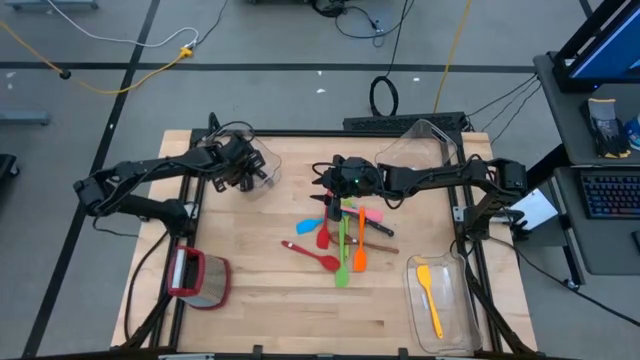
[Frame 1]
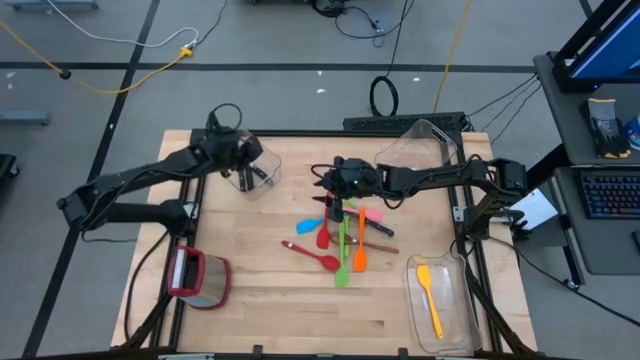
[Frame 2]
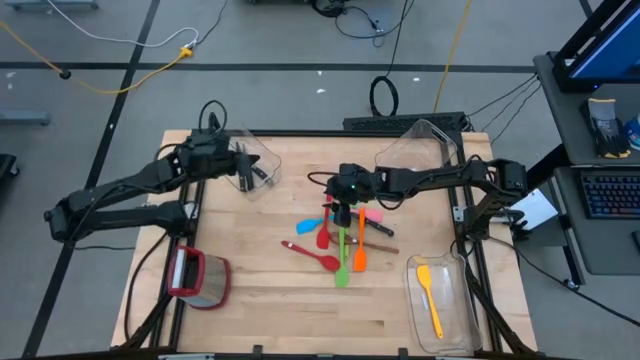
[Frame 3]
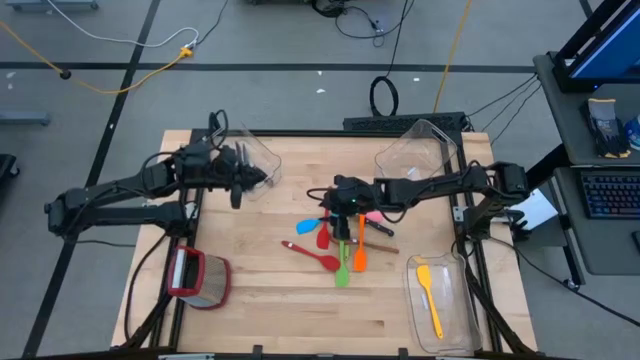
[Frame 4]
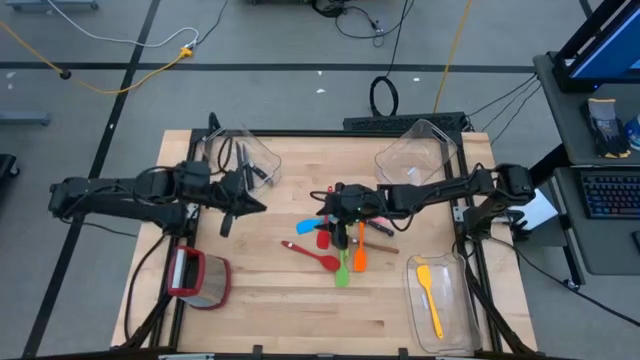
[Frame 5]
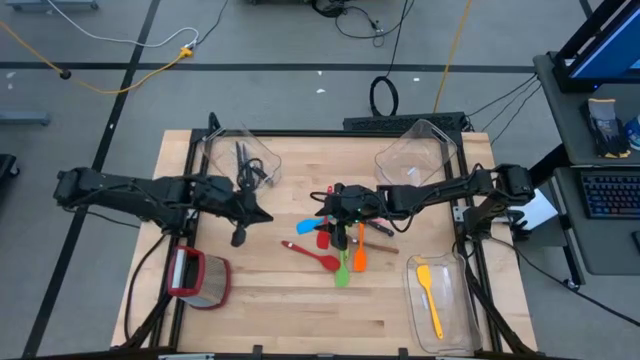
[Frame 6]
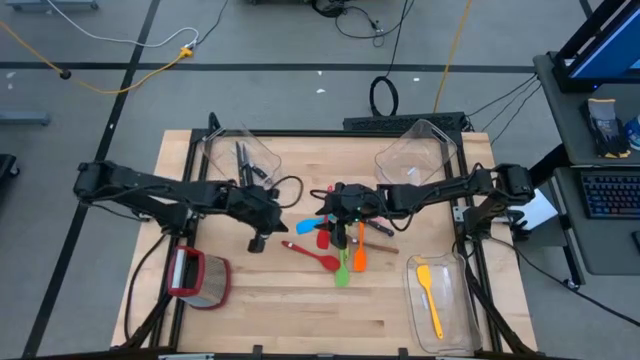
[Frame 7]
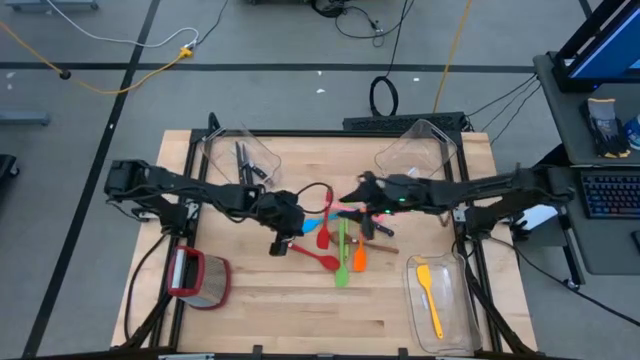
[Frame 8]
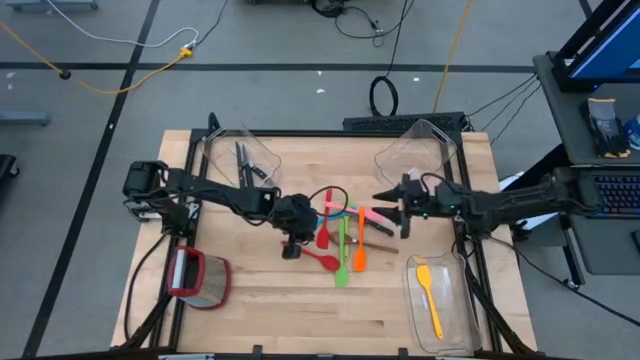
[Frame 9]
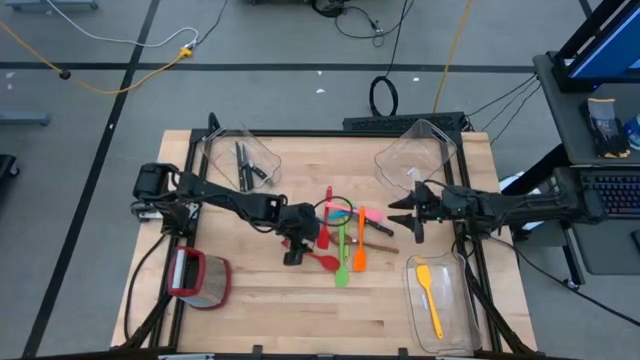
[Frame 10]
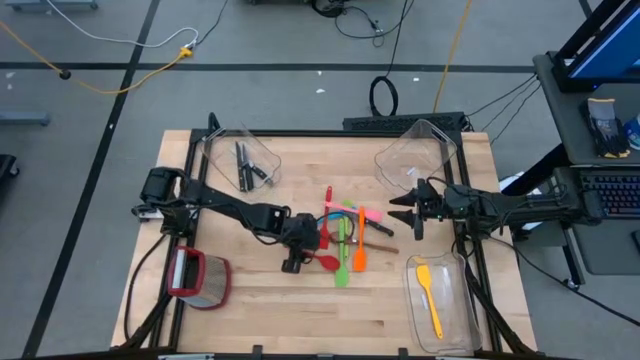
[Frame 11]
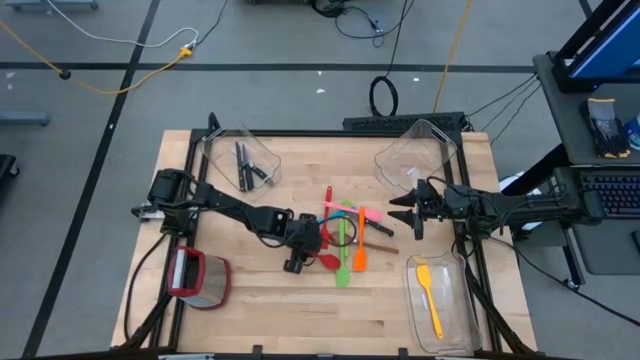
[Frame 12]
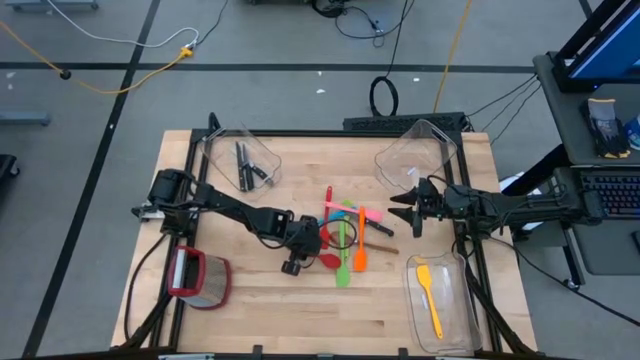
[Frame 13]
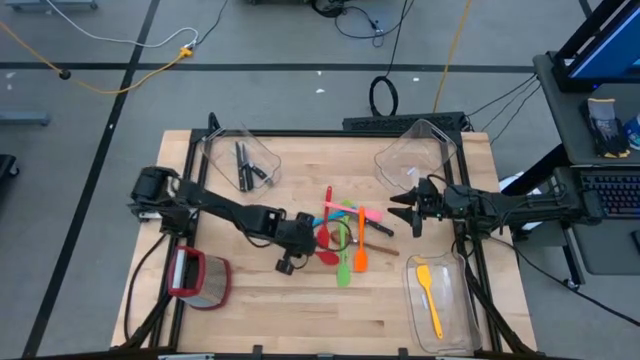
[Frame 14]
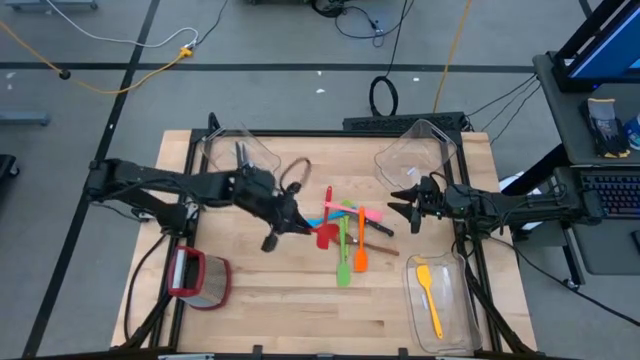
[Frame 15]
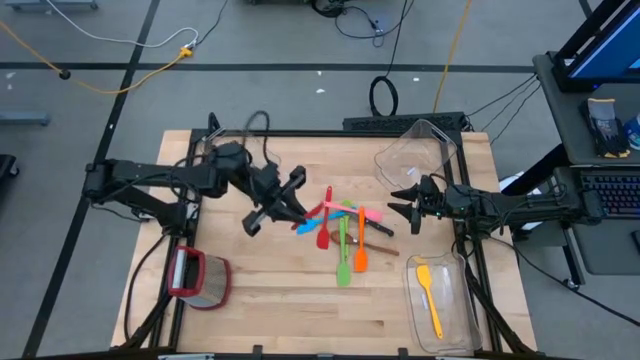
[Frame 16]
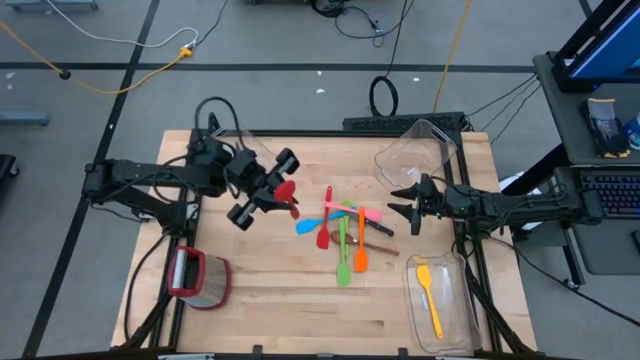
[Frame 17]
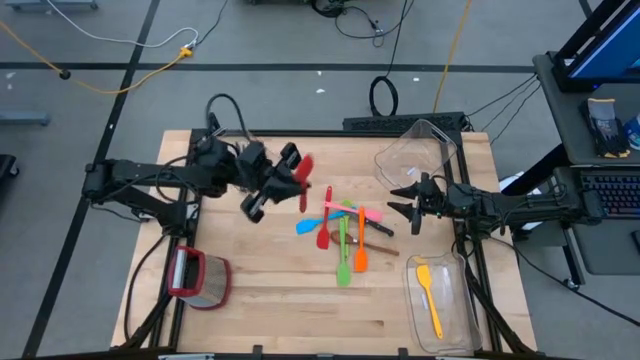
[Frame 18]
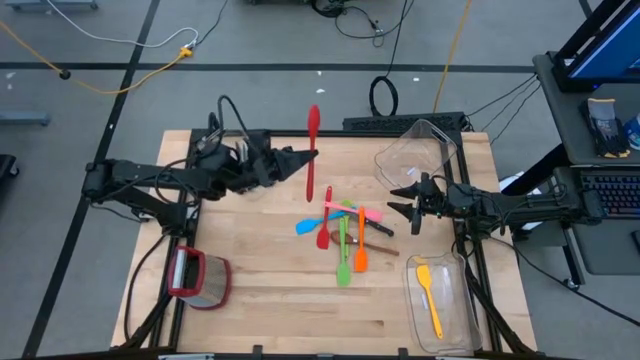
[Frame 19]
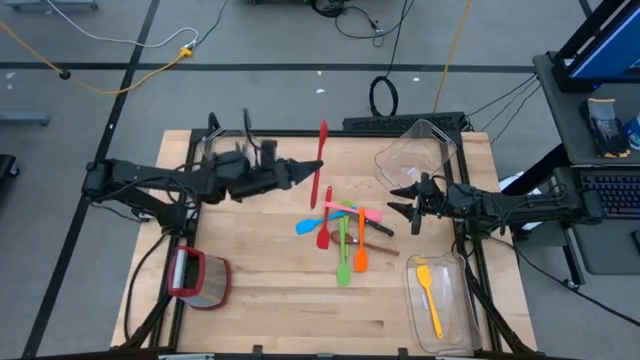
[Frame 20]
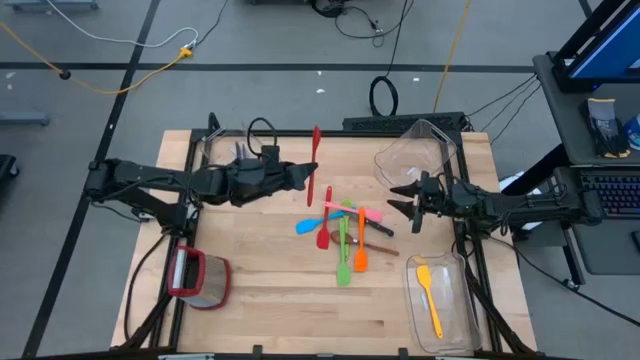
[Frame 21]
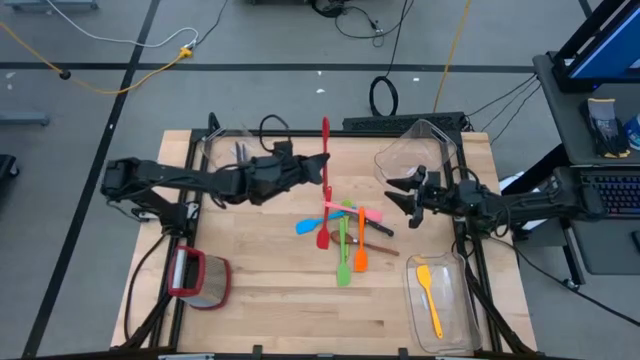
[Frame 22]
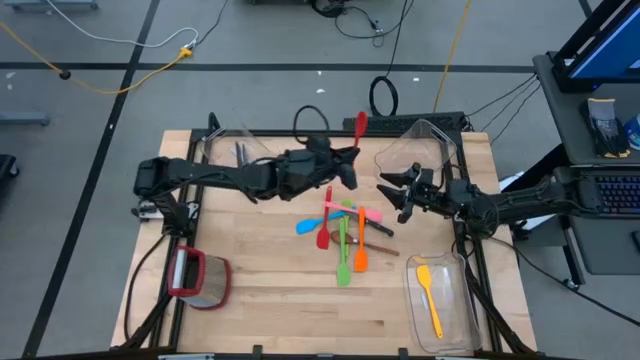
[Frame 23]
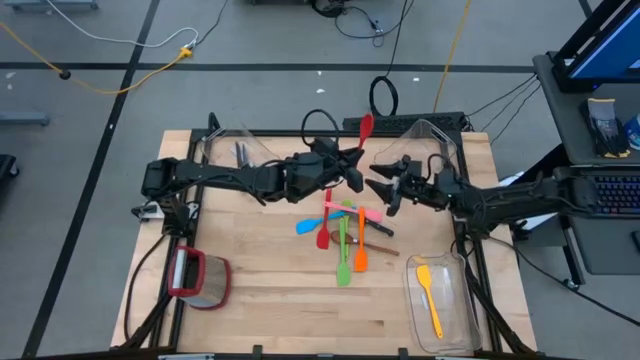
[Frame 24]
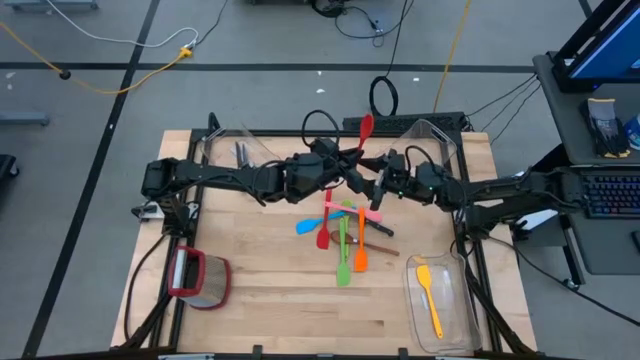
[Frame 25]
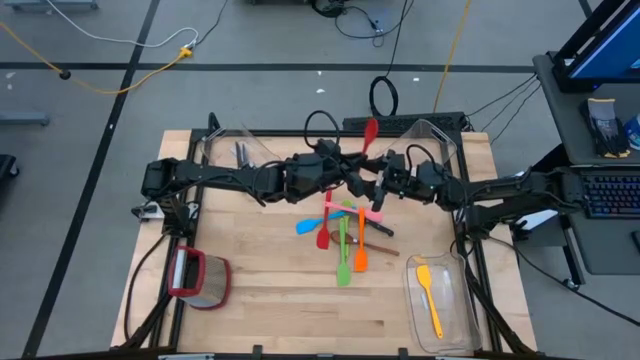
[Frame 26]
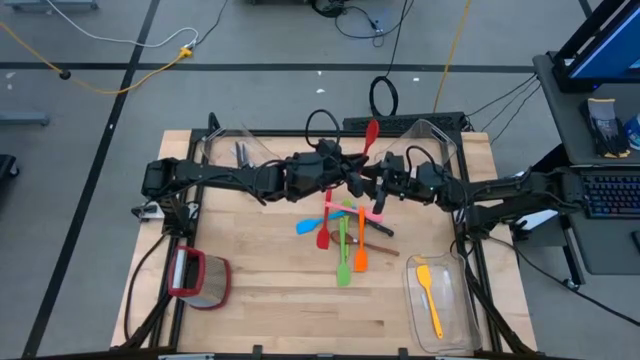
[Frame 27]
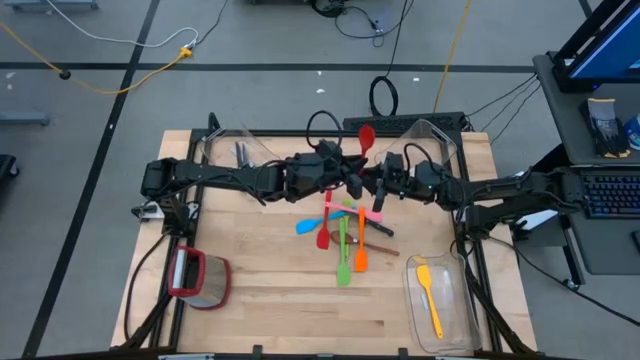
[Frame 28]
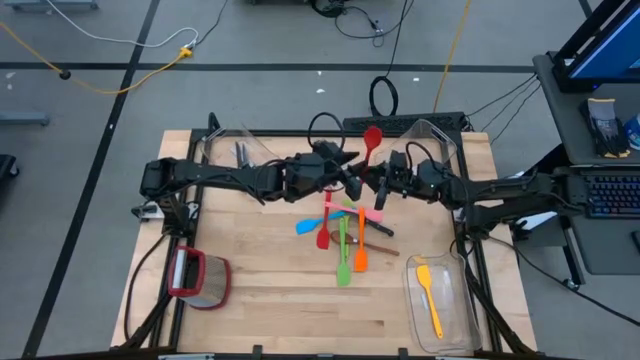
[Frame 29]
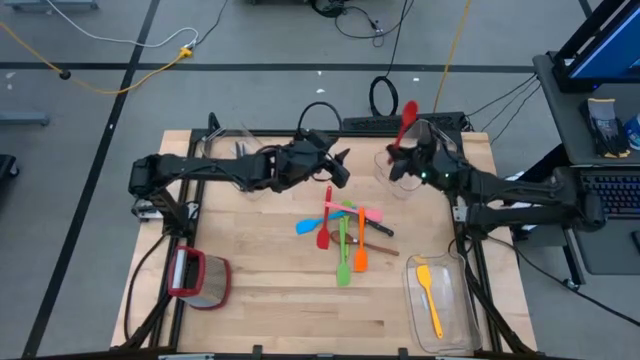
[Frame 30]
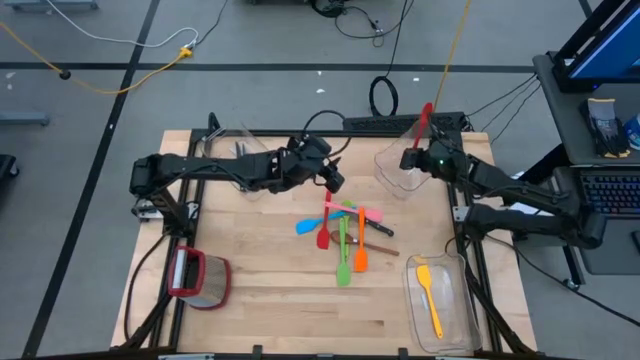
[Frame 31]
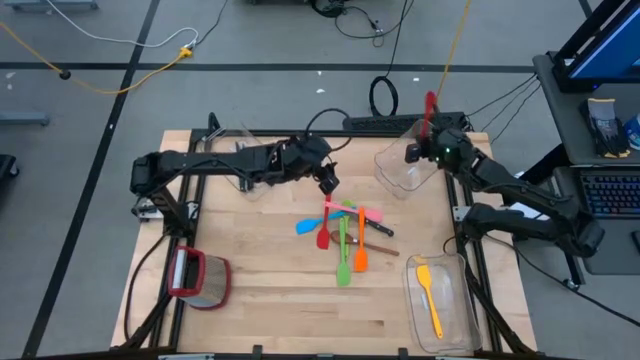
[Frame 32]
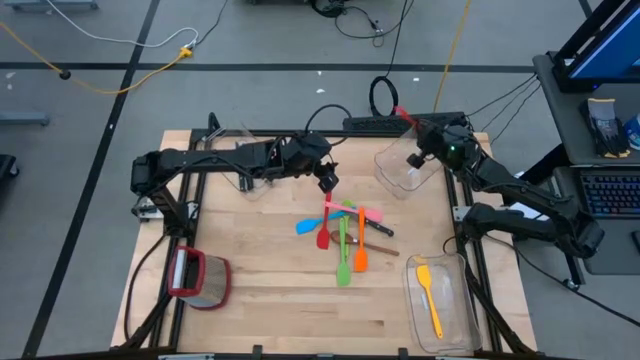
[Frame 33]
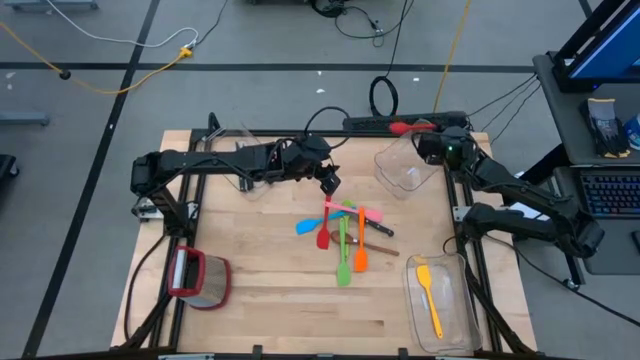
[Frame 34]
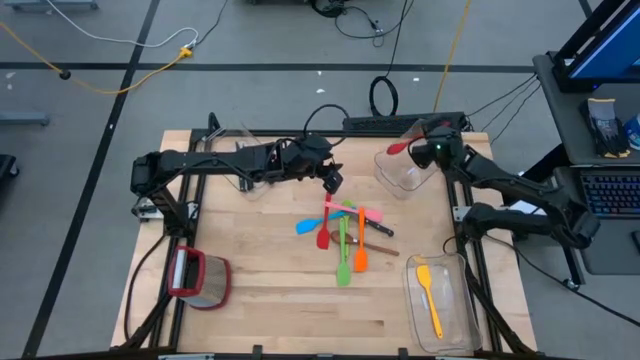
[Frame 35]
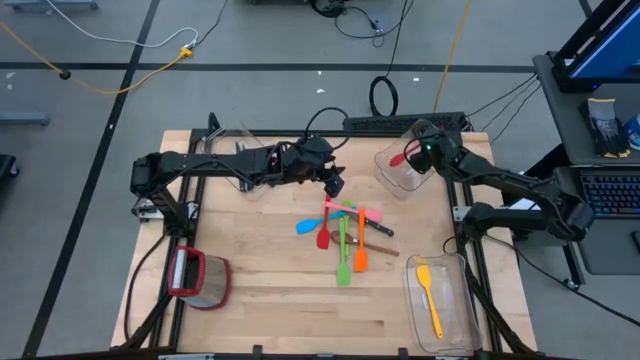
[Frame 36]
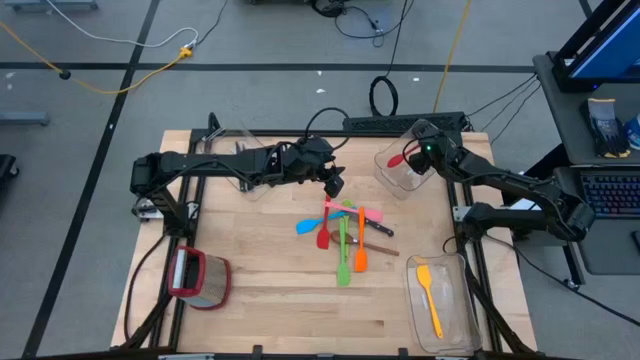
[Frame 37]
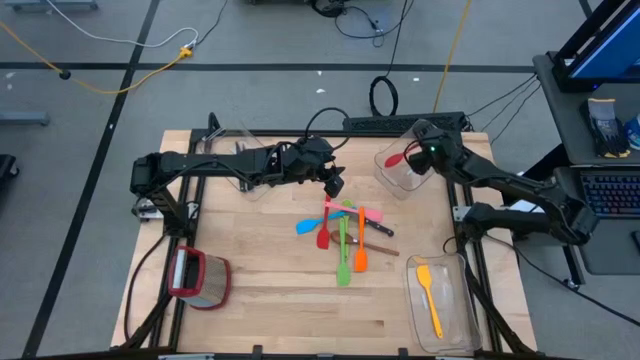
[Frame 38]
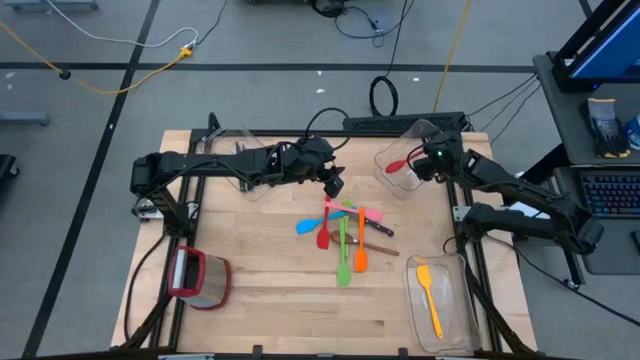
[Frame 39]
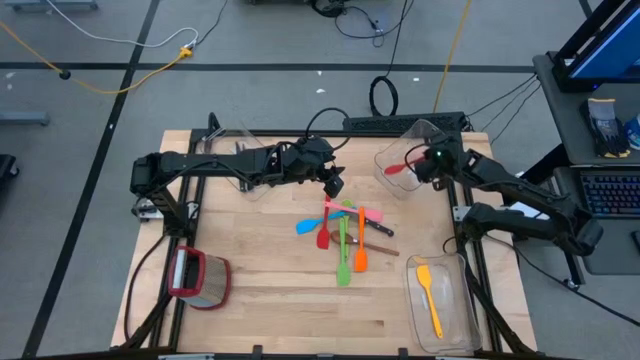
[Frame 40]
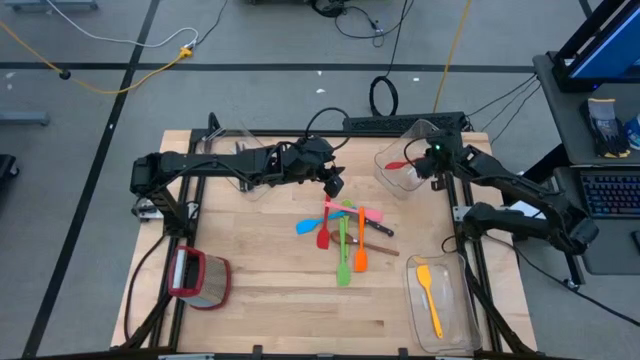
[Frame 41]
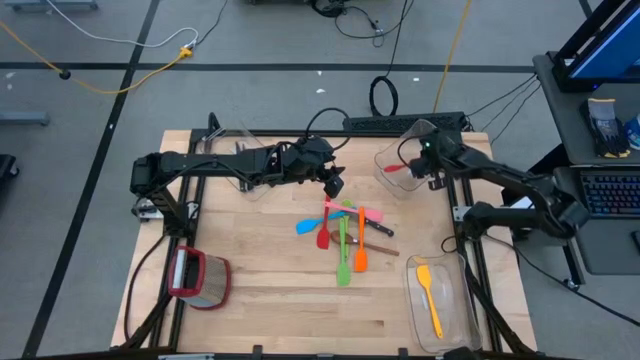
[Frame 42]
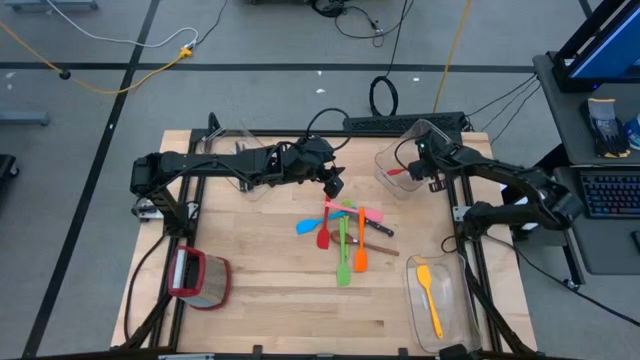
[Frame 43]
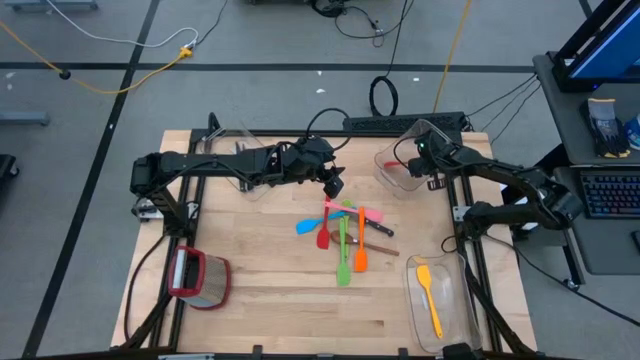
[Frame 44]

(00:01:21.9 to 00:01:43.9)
Task: Pick & Place Kitchen Items
Put the red serving spoon into the top right transparent bin
